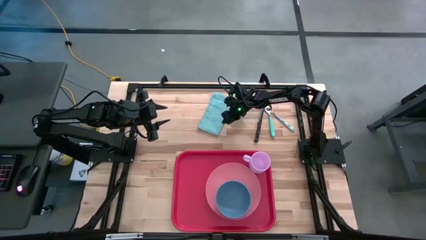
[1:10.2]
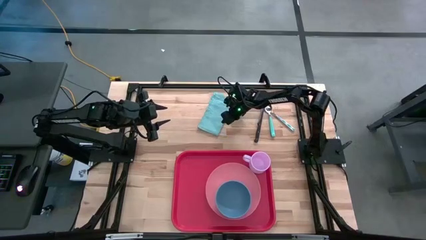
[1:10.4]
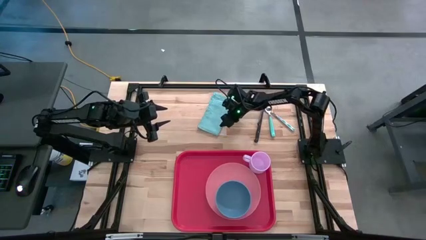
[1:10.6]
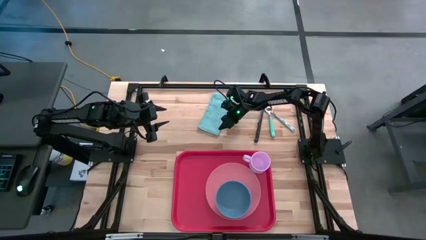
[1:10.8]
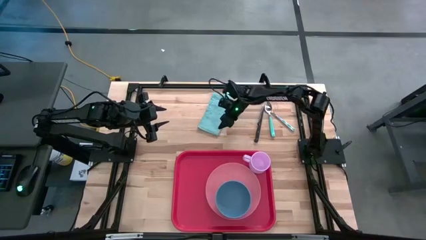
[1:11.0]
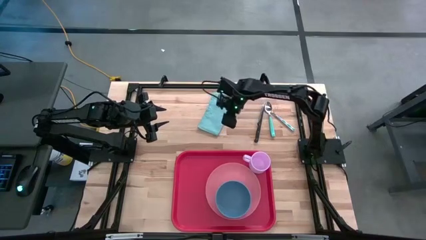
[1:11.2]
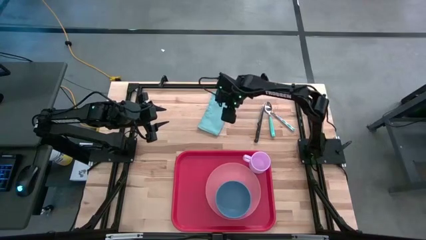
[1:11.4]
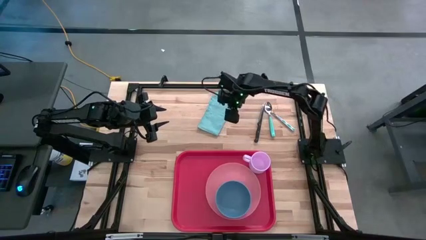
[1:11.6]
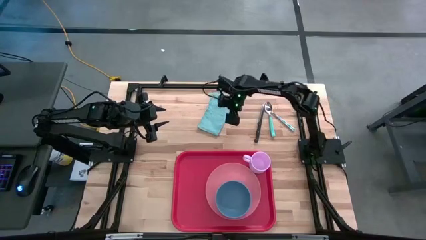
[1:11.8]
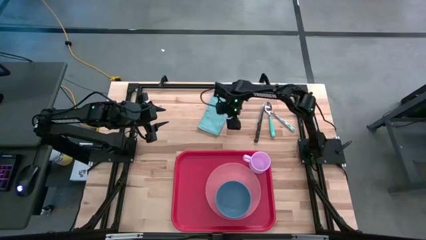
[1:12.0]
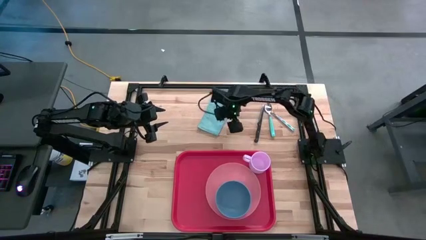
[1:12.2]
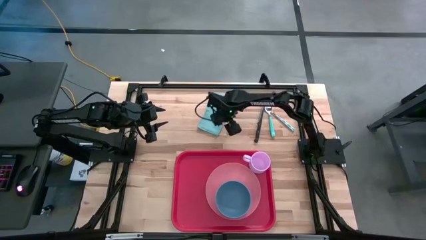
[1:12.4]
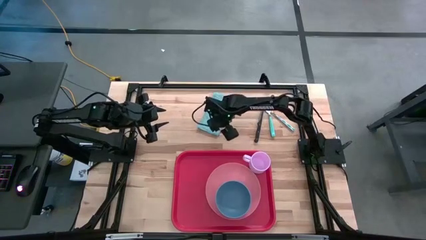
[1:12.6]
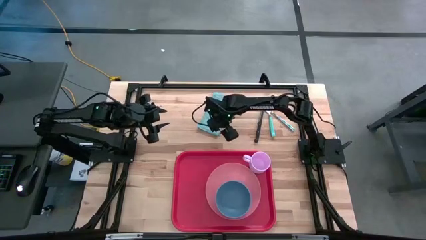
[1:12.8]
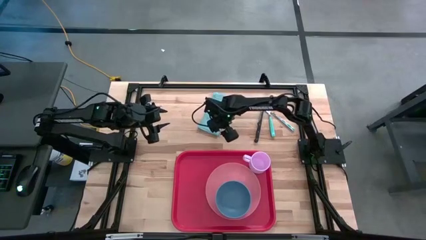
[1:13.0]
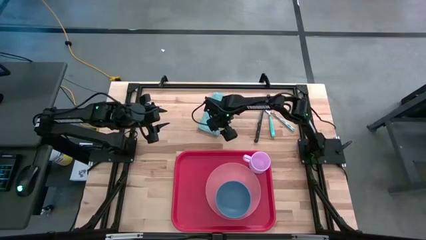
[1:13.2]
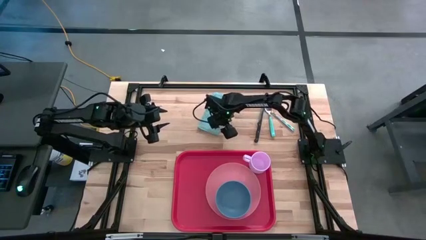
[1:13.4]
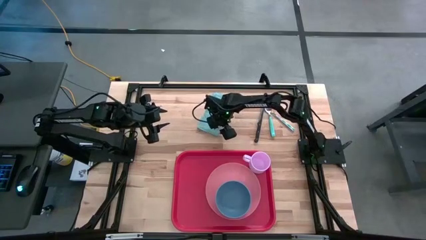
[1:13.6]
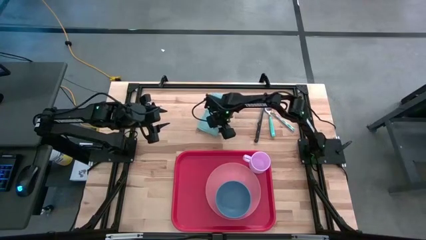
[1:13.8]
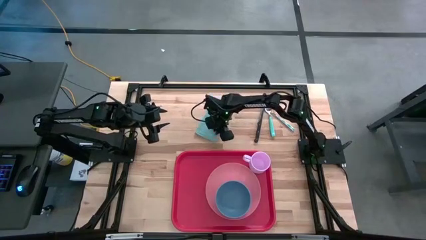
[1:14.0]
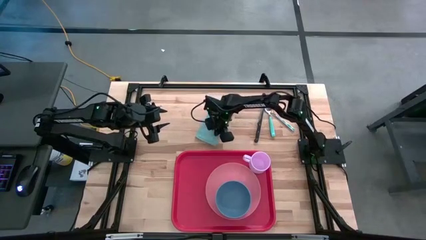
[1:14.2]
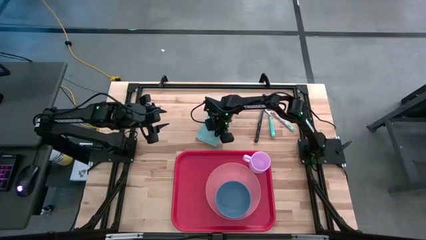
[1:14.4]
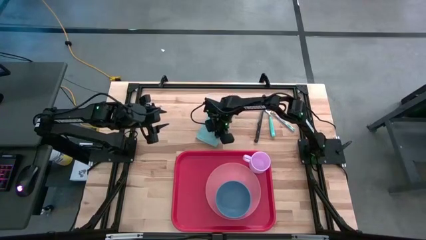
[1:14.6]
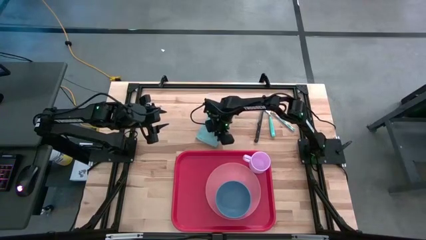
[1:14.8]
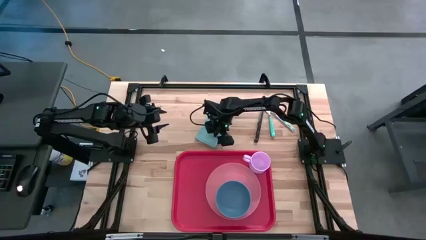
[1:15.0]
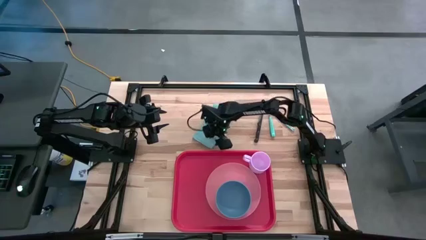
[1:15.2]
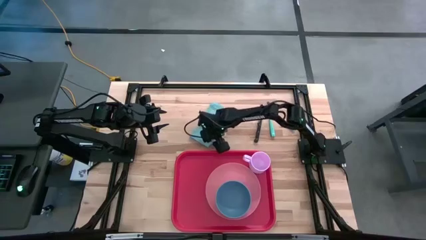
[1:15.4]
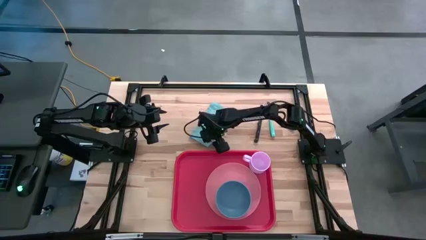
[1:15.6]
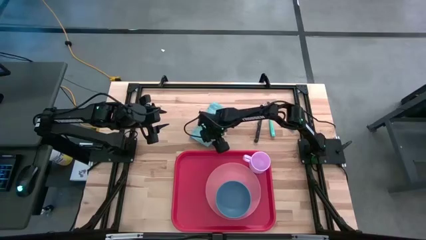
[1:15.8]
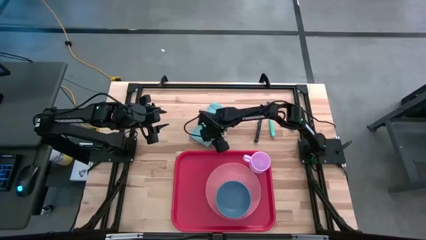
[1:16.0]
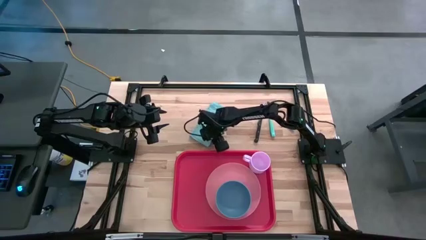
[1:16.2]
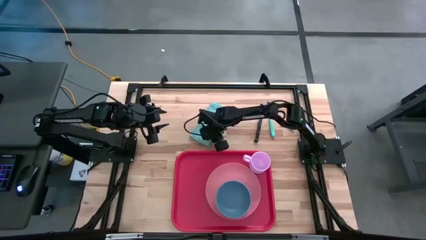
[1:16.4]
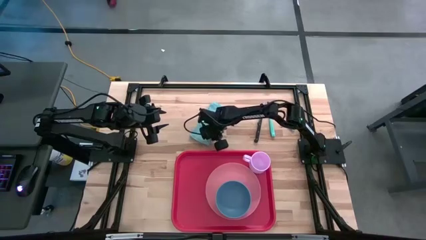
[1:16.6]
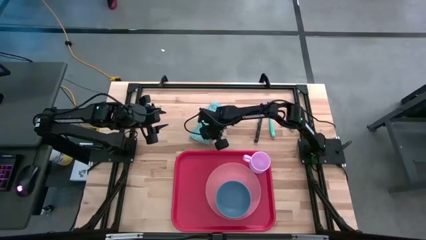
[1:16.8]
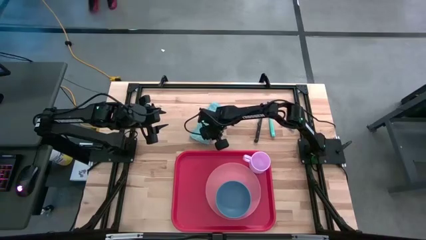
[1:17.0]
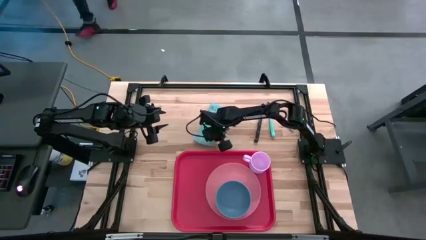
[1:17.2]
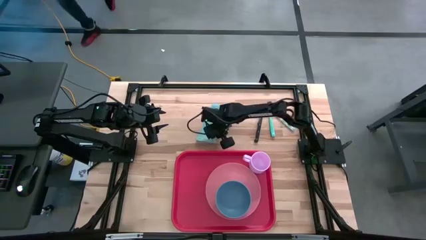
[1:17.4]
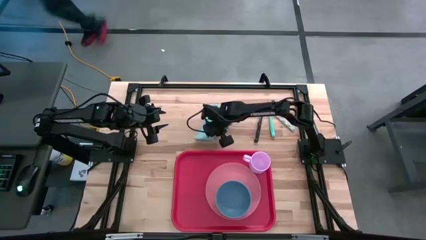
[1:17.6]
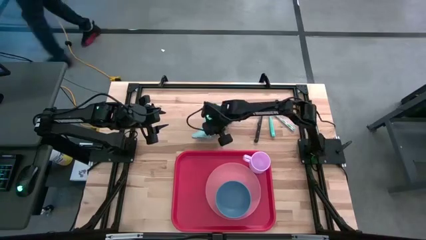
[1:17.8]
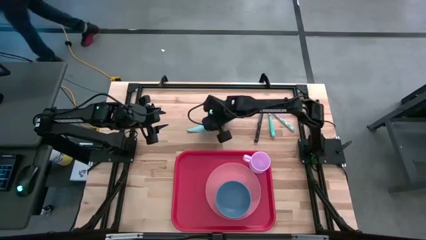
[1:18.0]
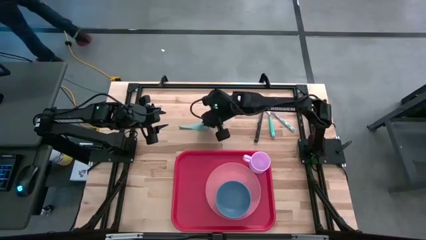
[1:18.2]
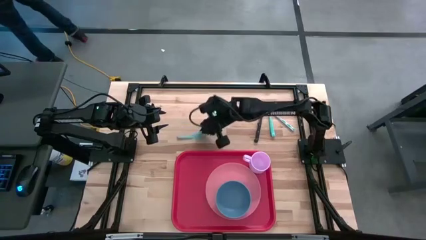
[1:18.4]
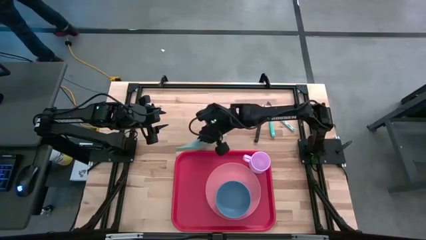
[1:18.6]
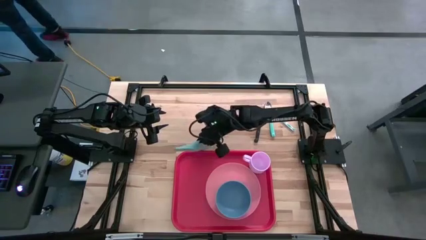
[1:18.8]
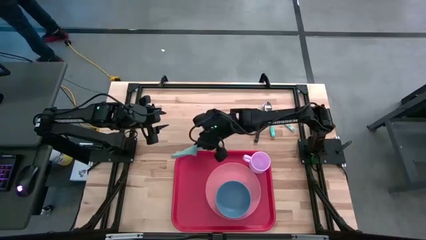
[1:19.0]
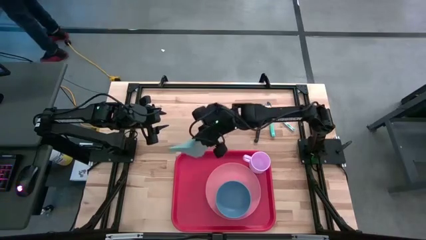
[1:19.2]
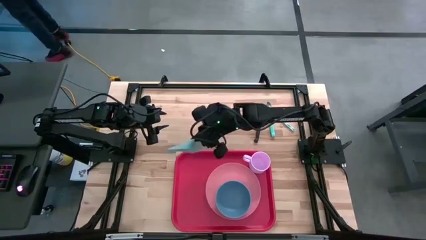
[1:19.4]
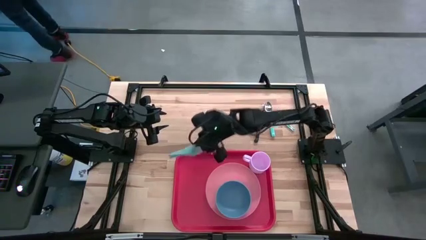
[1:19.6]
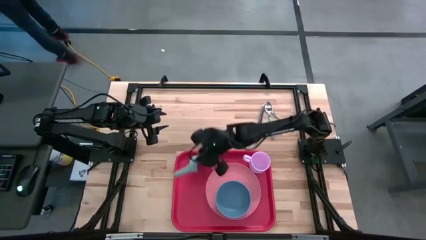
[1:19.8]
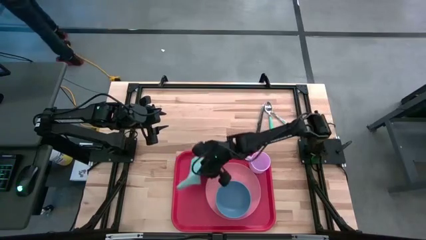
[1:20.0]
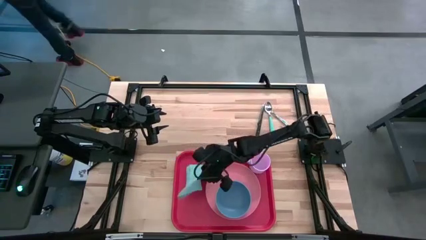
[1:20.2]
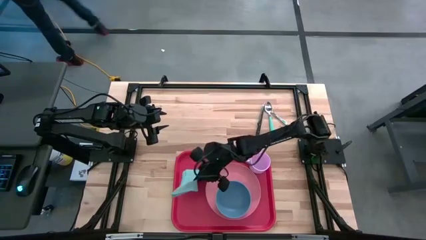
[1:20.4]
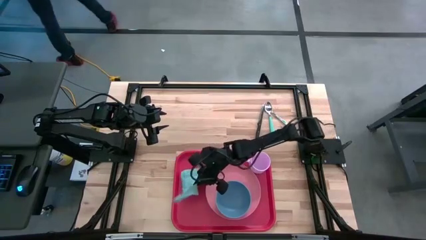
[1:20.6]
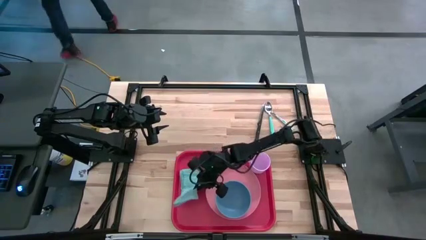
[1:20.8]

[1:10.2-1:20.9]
Task: Set up tray
Put the blue napkin on the red tray beside the pink plate

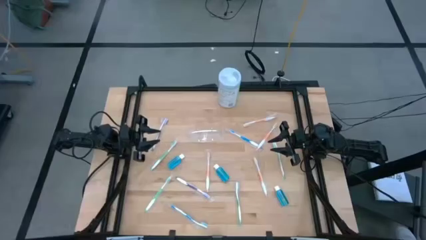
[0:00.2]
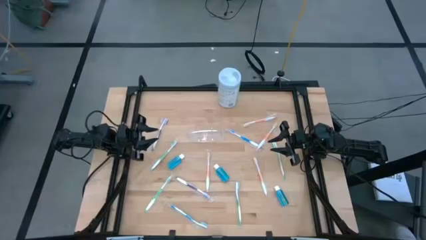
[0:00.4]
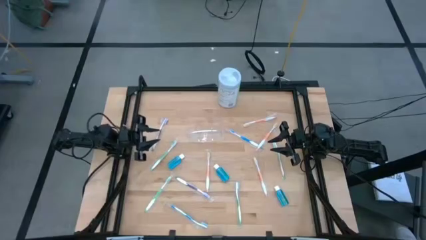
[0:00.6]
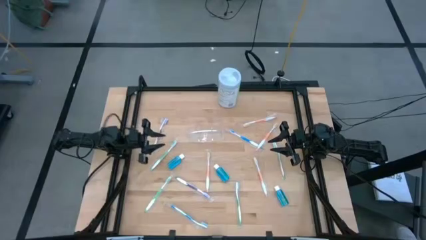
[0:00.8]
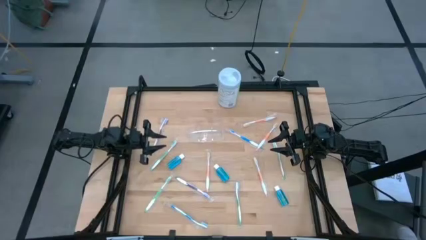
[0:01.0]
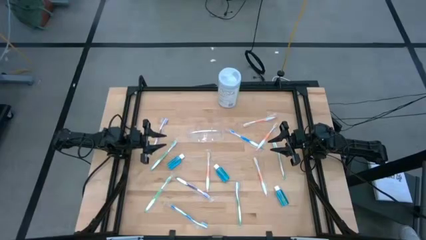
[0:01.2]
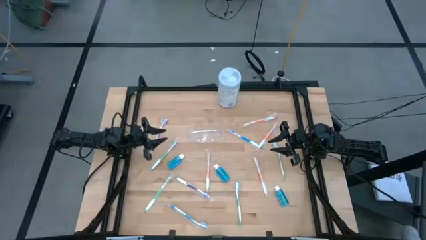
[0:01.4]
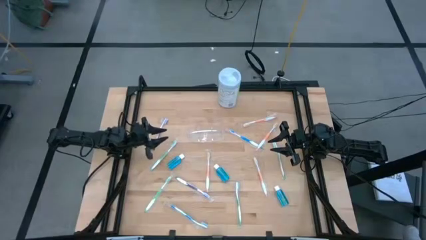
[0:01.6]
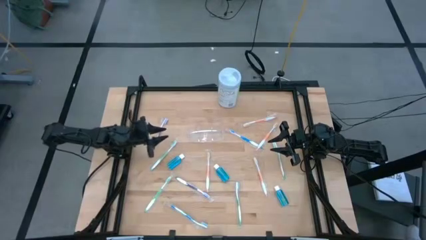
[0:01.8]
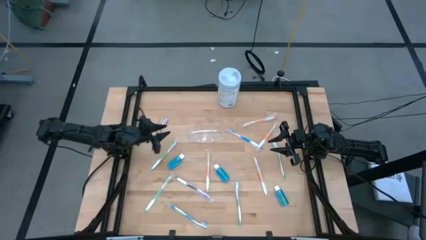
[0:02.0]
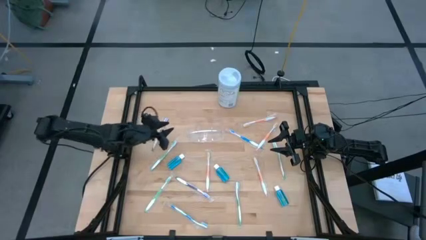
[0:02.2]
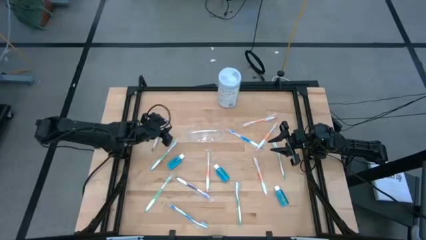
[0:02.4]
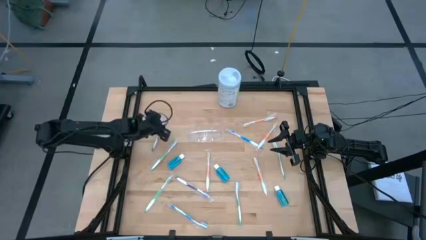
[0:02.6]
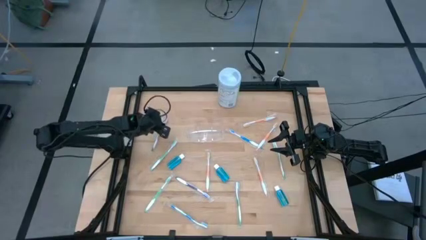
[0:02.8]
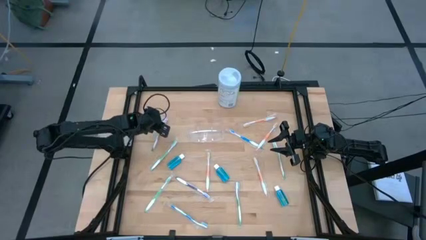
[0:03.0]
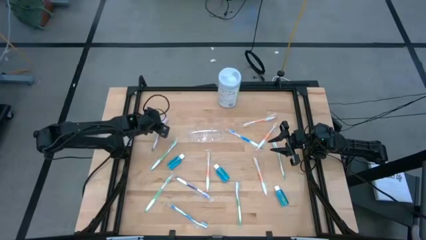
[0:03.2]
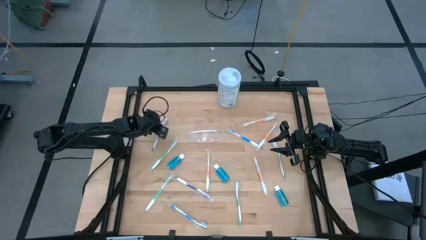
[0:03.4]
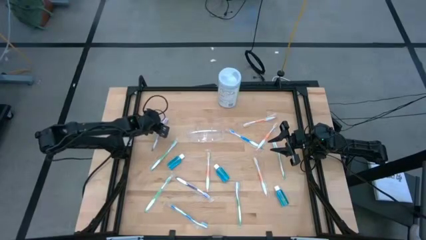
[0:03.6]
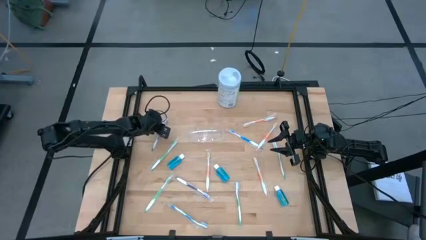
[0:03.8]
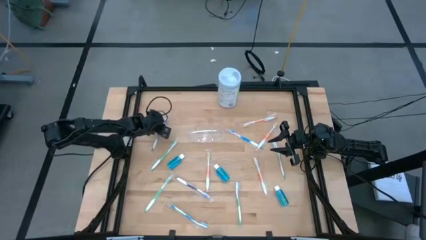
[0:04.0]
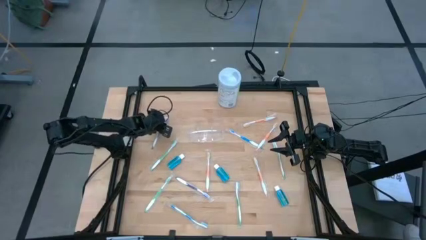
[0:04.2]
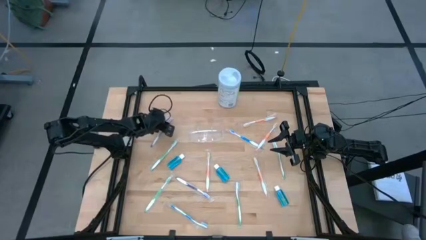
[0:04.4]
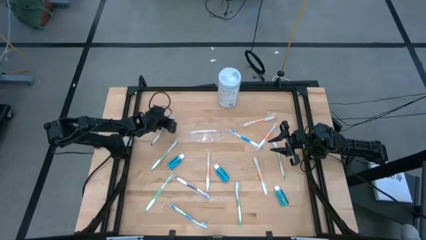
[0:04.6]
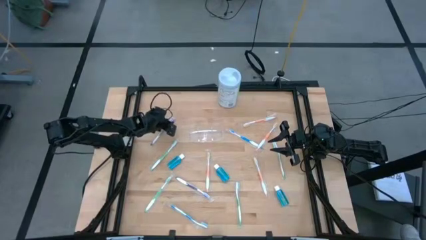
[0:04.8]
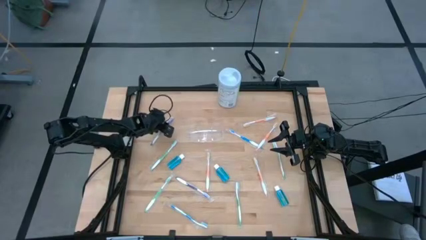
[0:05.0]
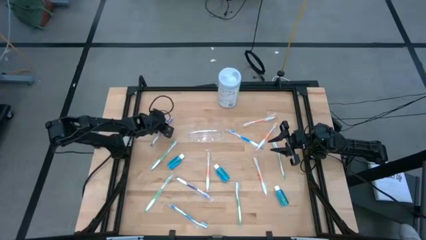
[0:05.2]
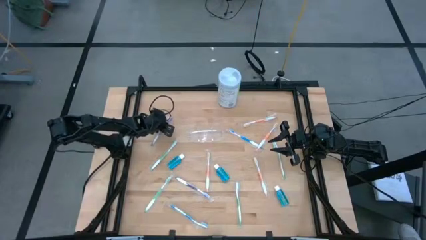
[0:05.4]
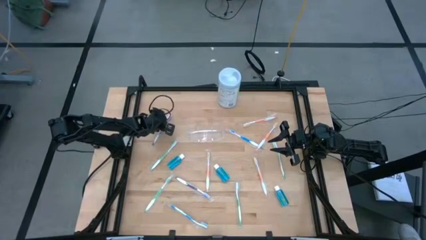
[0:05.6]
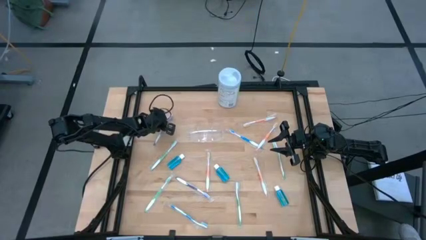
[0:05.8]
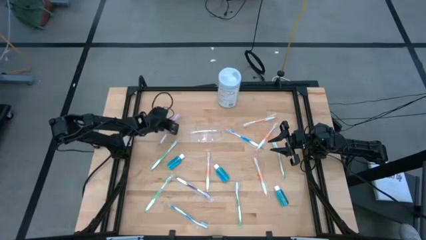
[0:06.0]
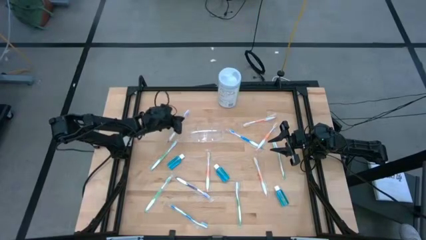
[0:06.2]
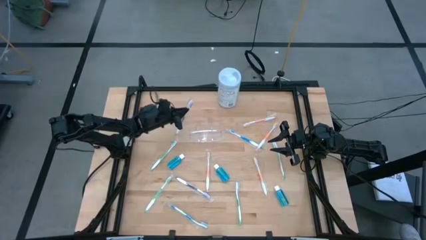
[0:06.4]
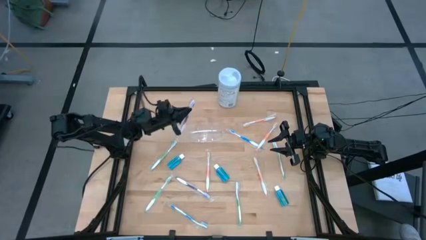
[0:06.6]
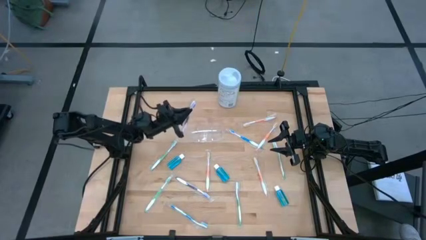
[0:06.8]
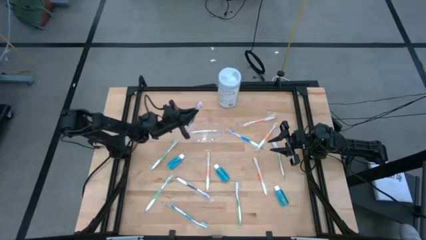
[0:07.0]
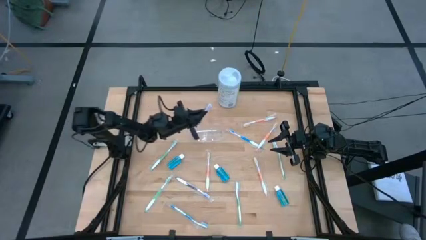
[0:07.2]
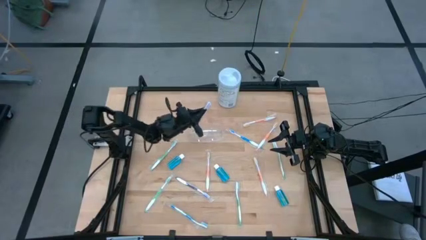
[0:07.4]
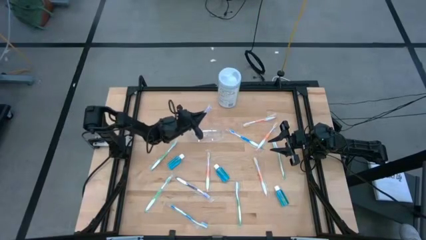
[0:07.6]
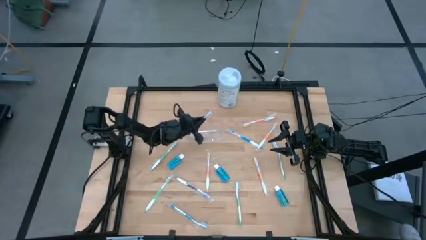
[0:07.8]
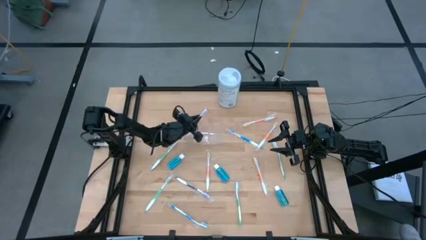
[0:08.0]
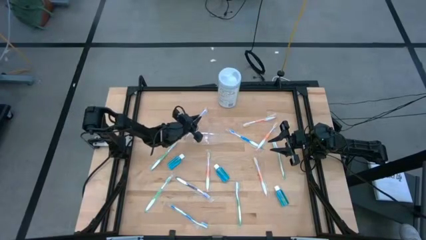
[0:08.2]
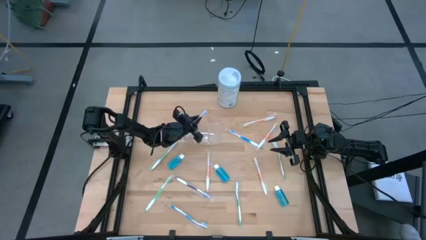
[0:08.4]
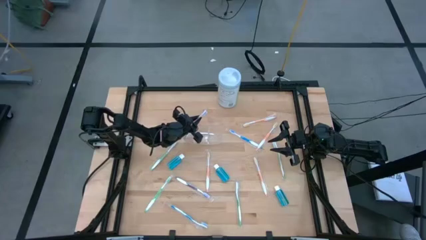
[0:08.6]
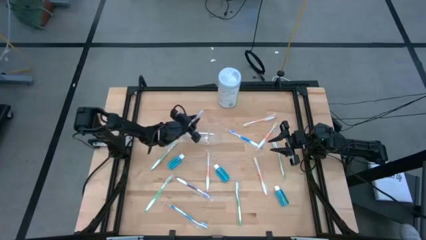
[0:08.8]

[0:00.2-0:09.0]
Task: Pick & Place toothbrushing station
Put the purple toothbrush into the transparent organizer
